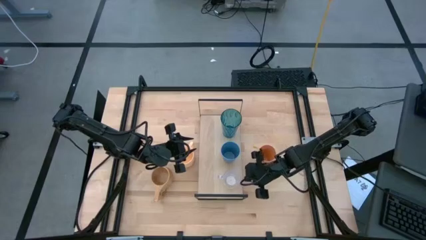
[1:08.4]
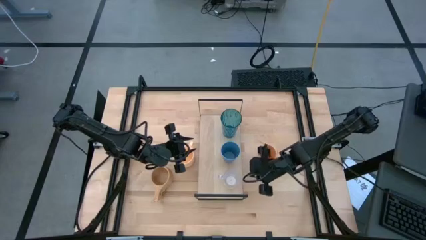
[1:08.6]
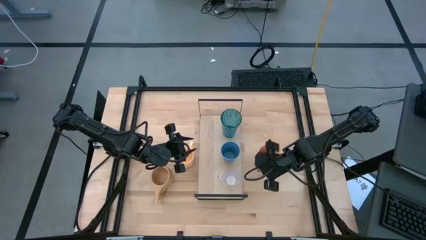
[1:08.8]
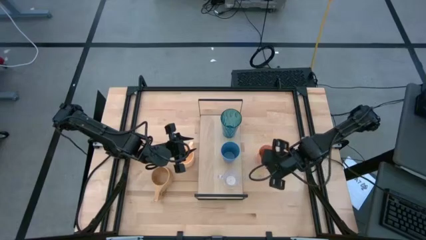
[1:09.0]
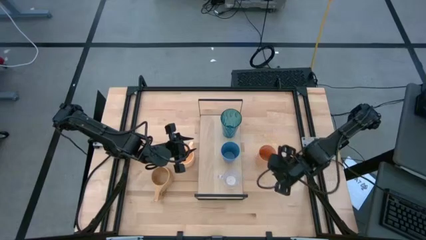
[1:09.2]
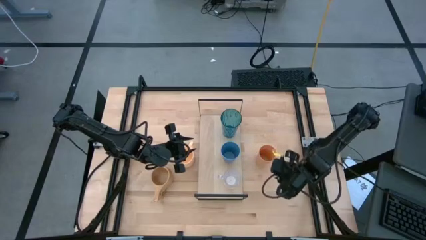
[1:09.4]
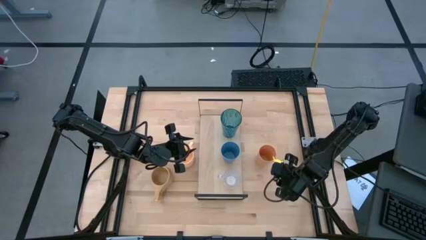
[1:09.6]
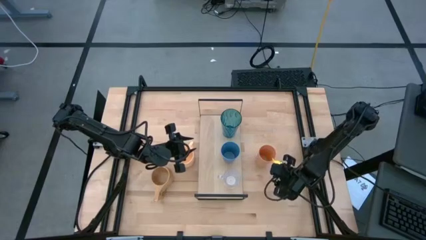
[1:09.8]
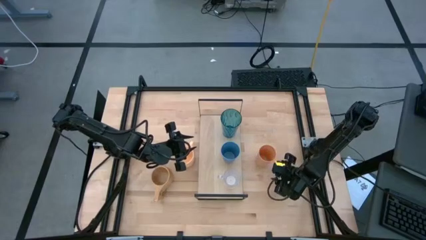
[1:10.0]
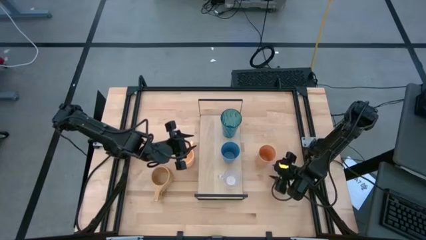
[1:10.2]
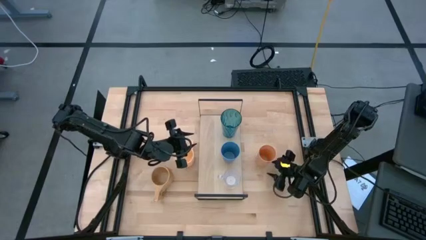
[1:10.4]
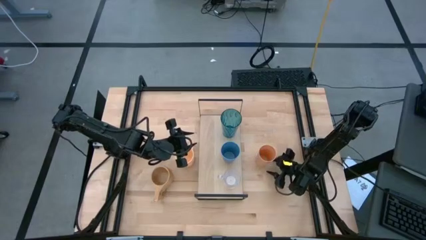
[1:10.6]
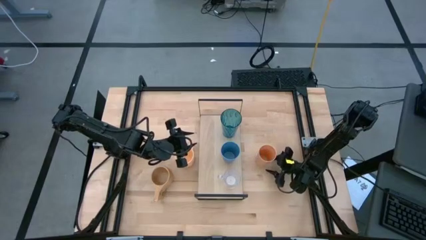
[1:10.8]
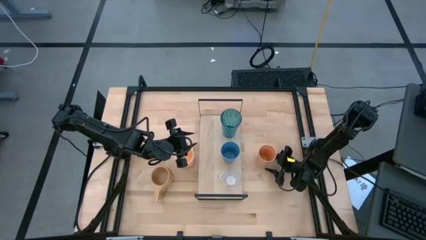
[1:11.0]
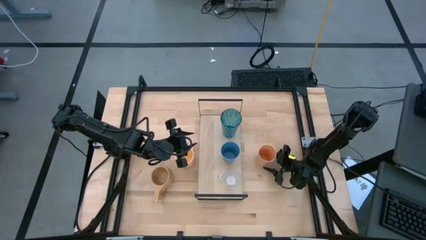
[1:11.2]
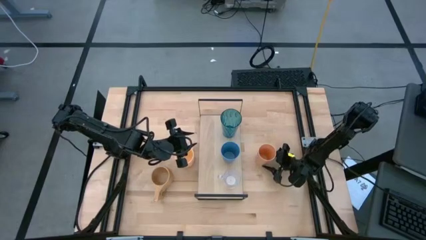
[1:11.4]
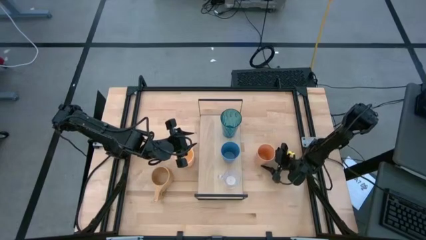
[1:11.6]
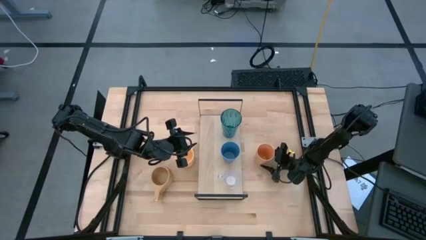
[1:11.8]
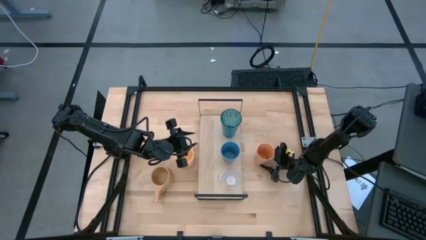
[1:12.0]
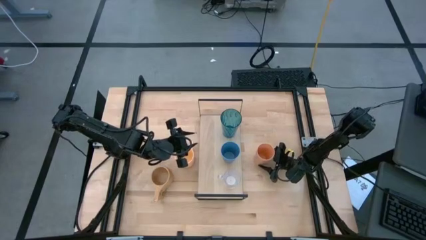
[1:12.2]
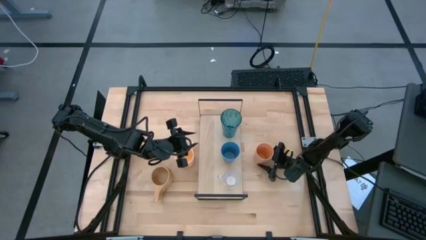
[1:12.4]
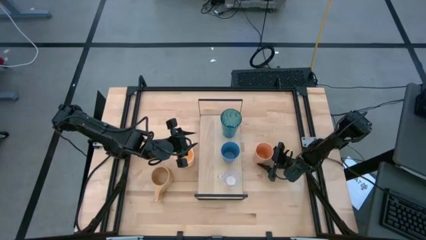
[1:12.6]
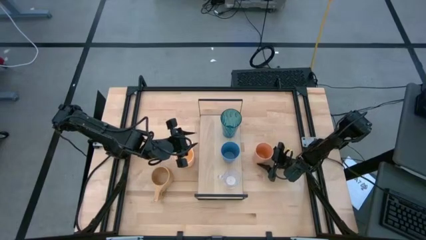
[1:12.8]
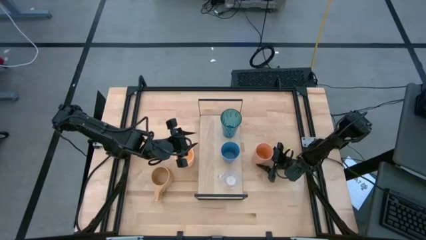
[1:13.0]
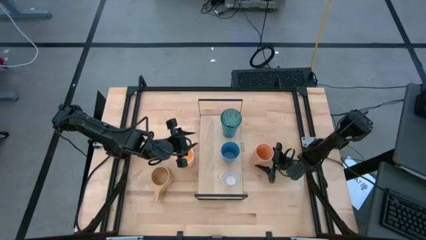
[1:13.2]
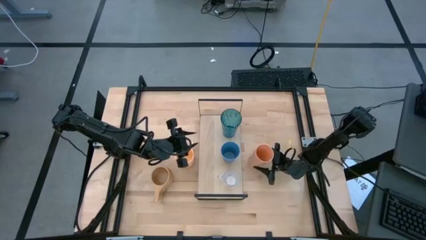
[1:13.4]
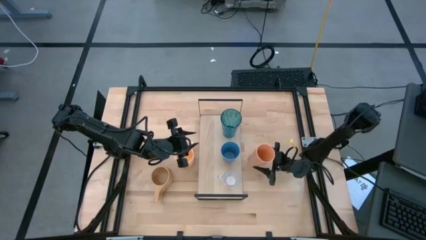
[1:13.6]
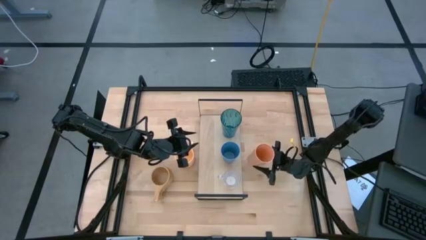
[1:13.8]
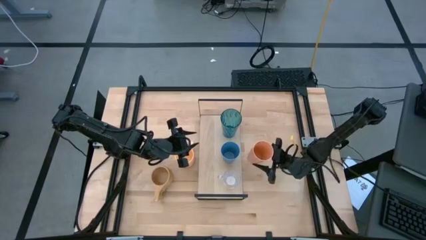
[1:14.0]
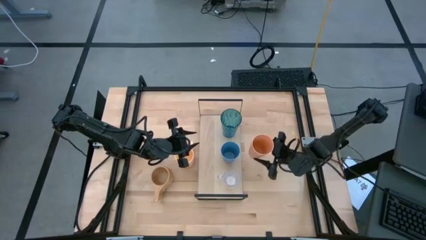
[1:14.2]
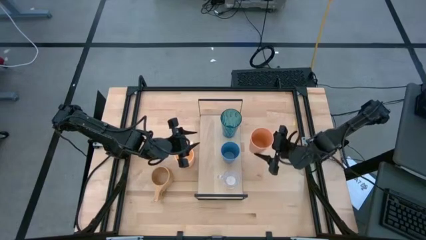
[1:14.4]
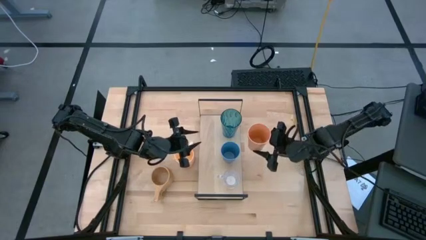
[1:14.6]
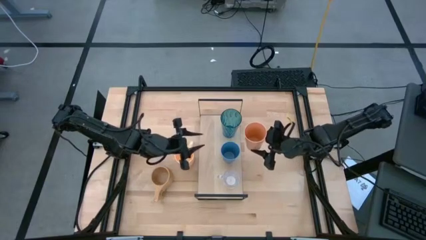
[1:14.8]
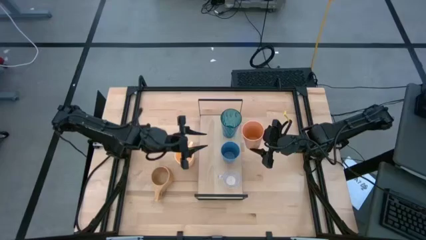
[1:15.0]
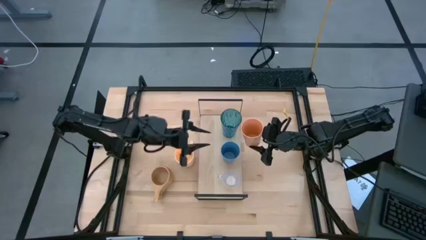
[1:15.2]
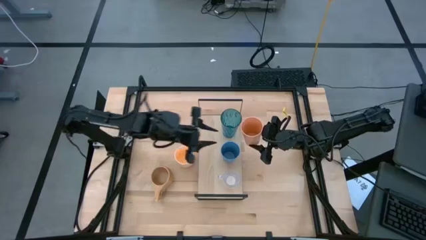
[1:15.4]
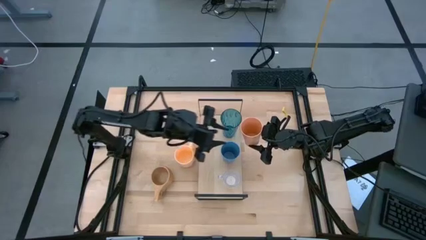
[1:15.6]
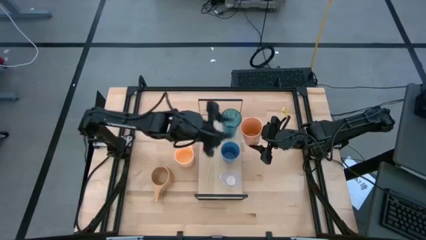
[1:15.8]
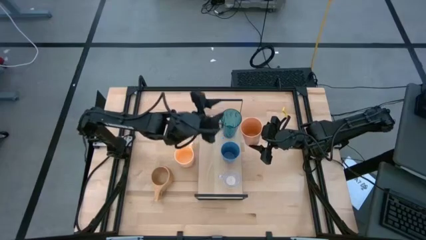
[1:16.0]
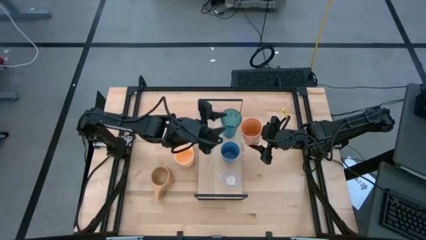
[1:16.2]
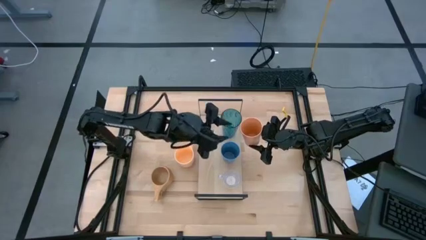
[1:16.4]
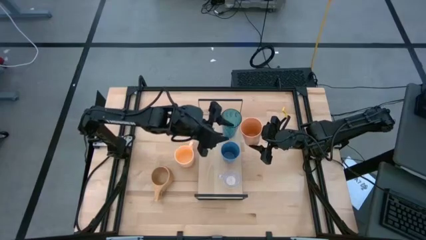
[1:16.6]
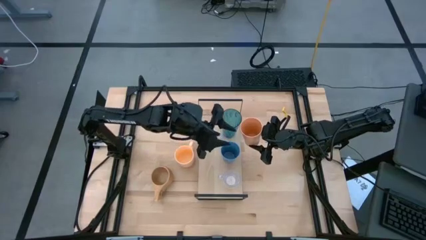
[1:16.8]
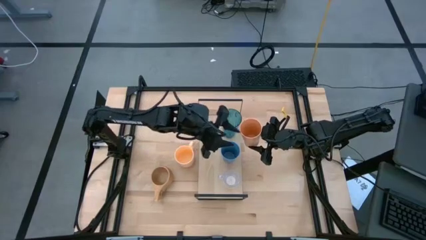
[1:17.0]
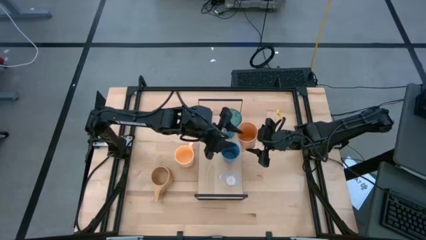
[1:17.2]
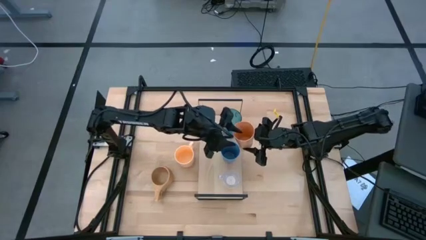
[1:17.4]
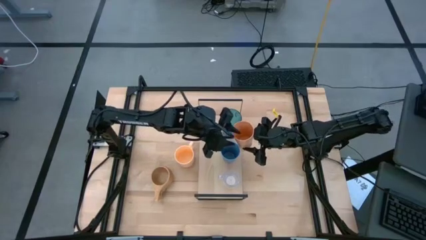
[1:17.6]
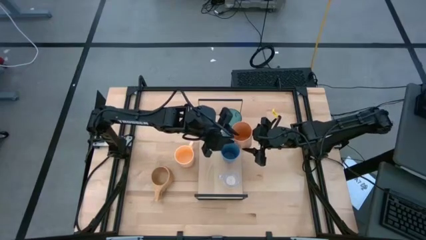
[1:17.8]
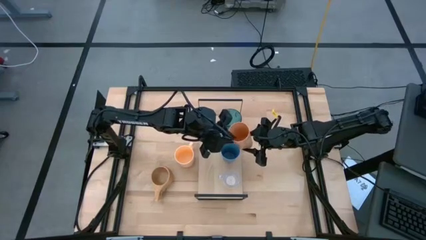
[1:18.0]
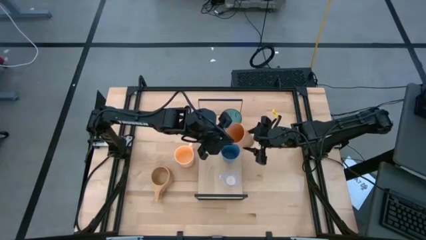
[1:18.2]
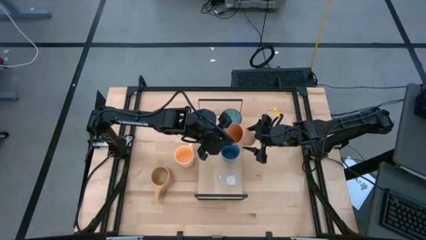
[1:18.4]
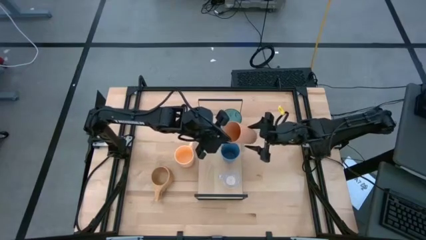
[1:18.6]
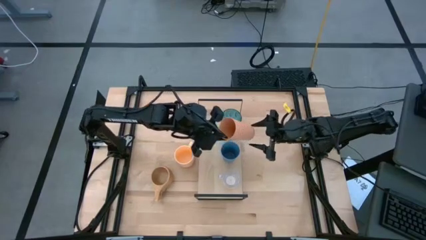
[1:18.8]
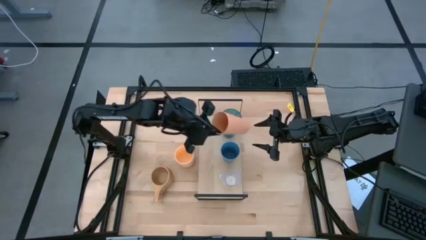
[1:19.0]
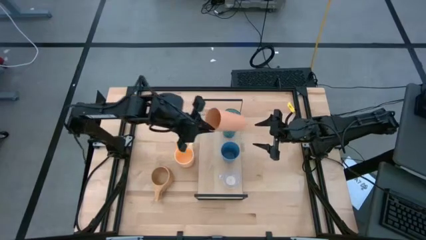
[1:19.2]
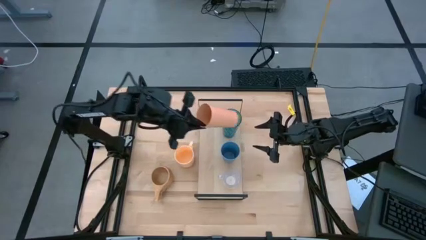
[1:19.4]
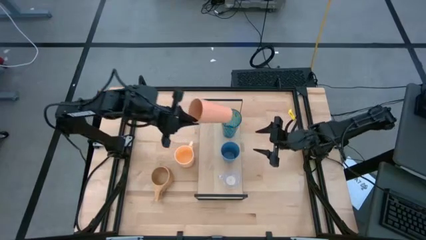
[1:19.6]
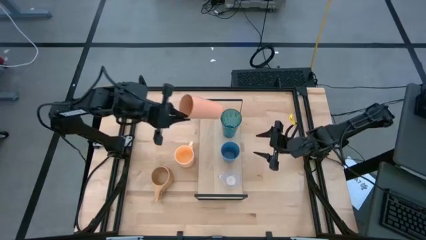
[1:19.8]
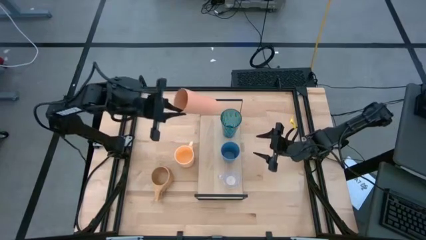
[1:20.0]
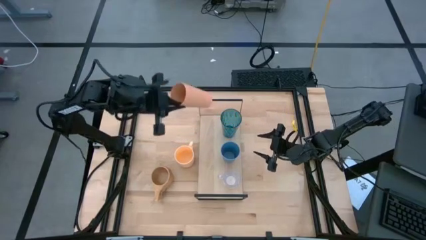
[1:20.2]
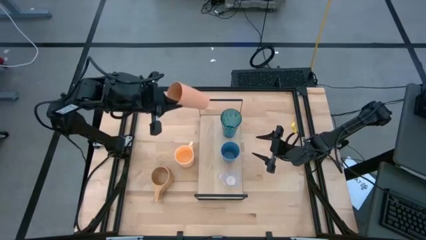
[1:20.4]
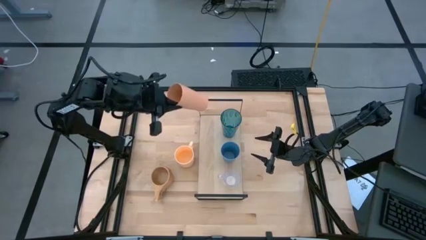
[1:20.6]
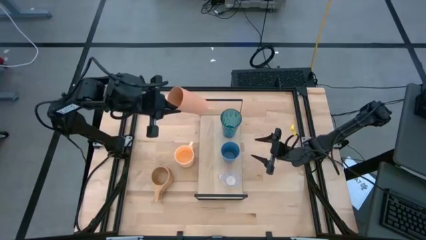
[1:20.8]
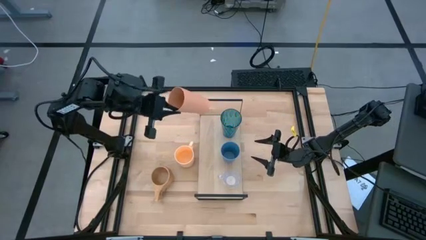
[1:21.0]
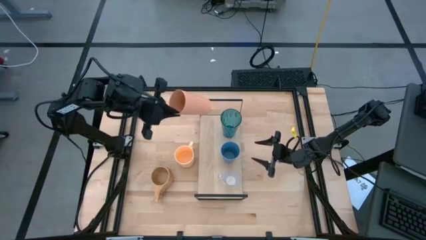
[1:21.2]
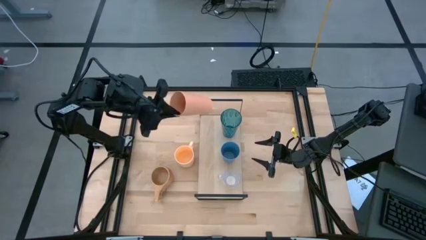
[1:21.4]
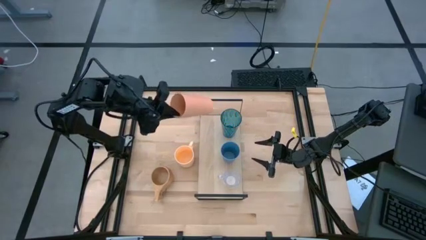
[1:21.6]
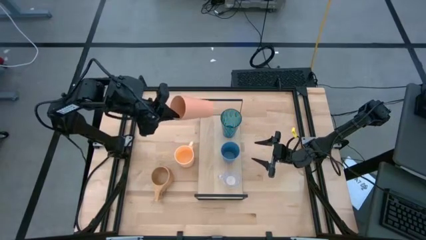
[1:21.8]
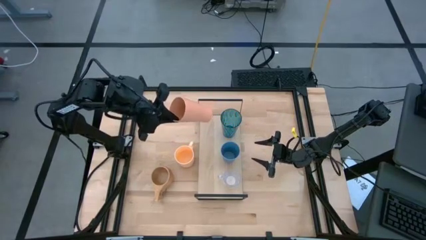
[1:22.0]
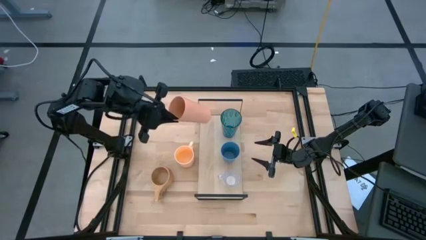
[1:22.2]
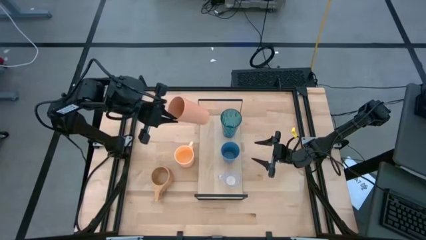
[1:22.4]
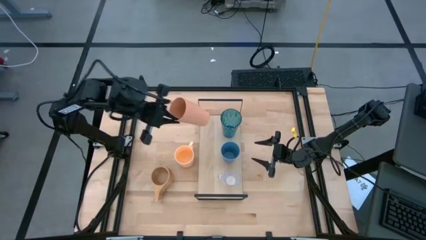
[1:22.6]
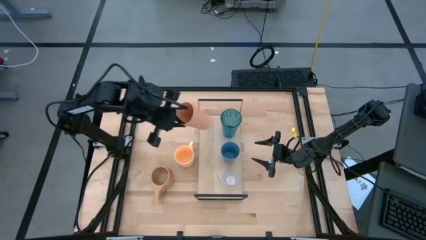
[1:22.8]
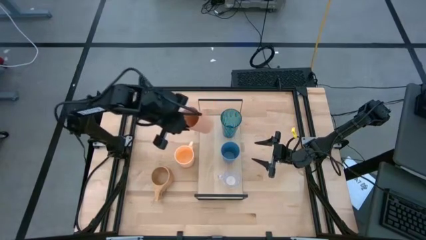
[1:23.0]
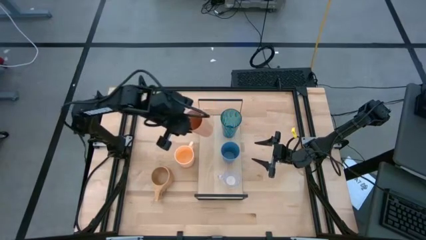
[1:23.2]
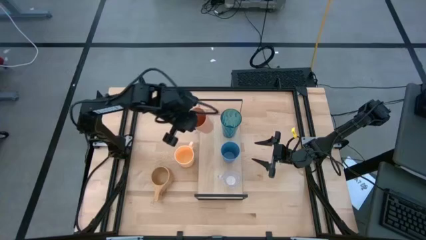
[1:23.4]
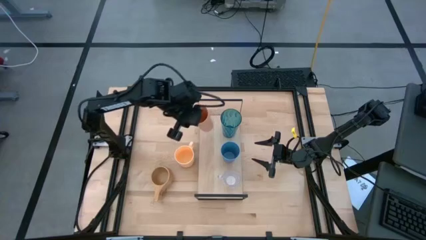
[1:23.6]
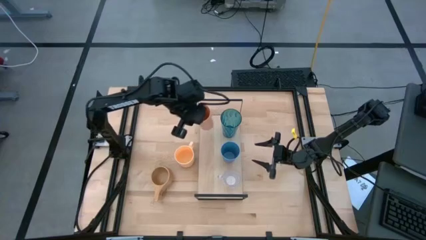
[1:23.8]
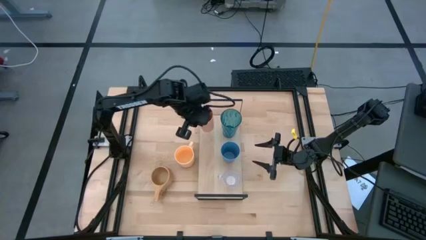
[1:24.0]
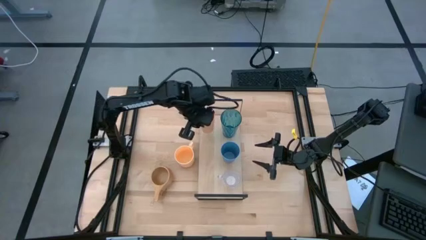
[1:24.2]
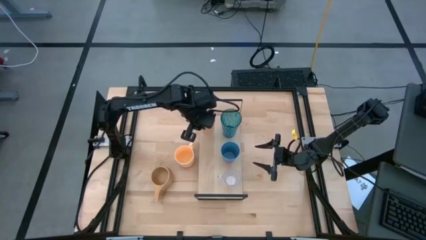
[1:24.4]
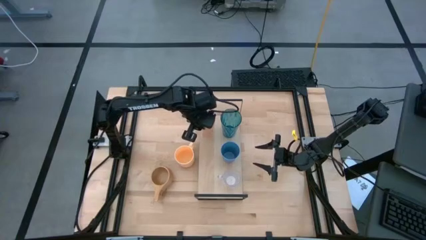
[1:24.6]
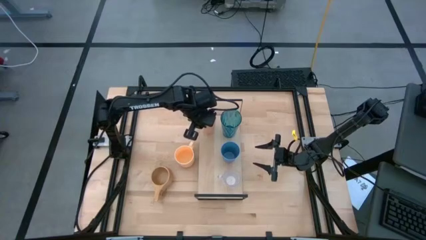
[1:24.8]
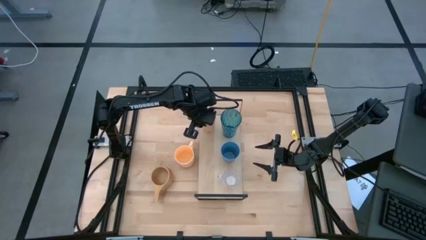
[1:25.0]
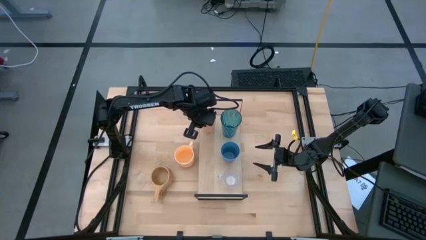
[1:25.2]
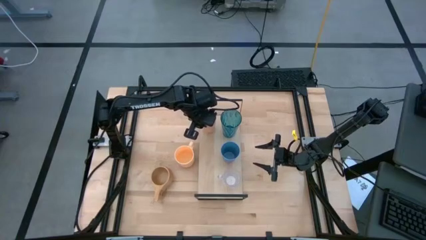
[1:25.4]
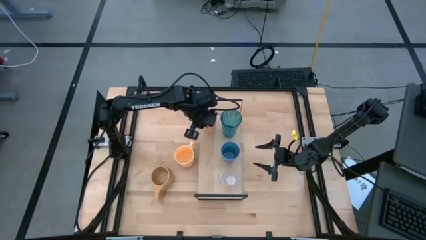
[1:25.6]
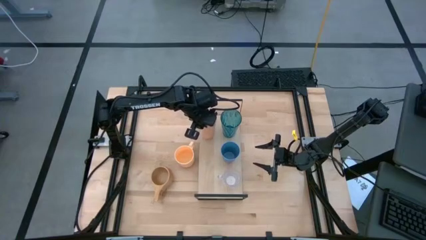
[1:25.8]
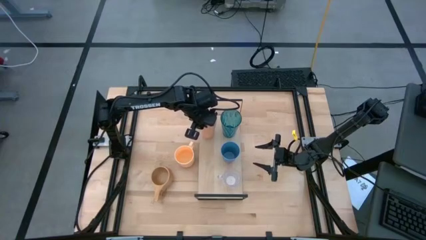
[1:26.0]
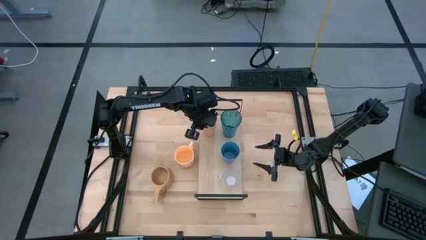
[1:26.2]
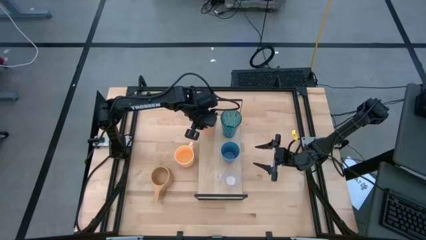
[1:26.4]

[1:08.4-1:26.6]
Task: Stack small to large cups/mugs on shelf
Put the orange cup on the shelf
